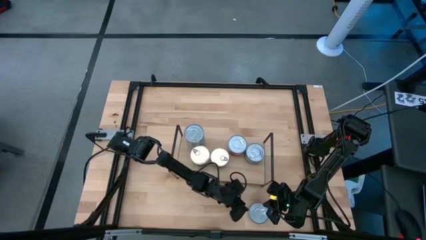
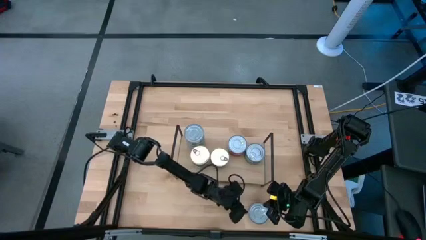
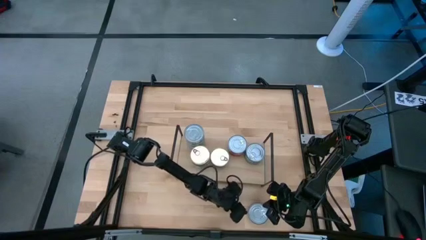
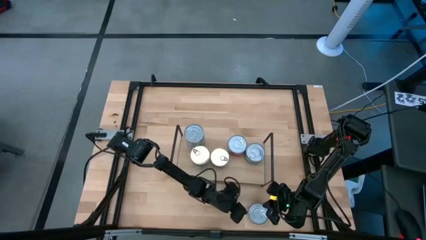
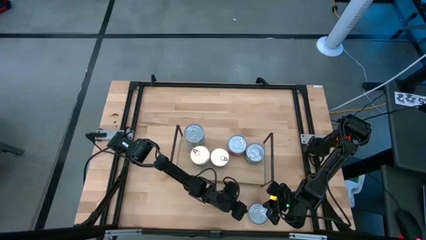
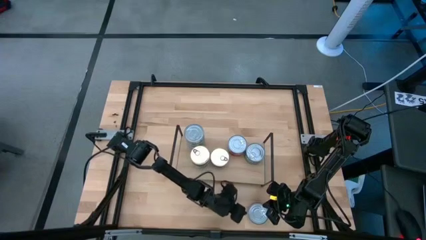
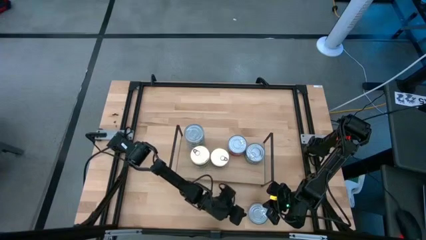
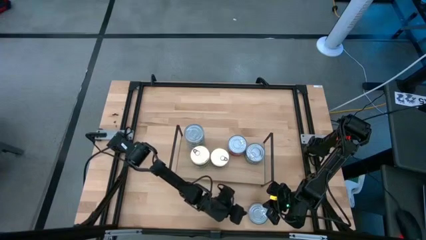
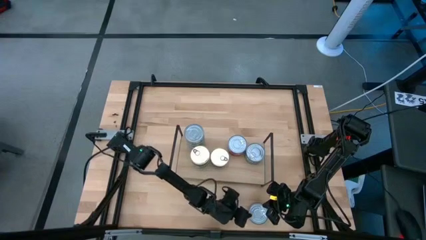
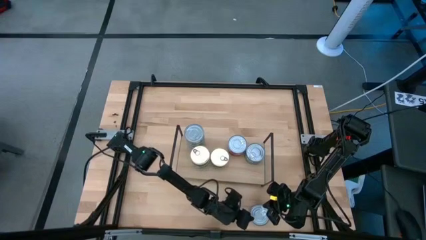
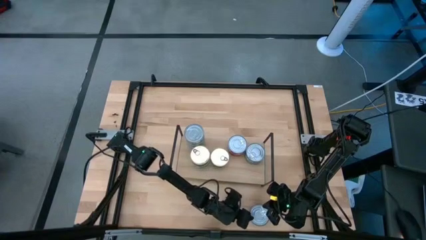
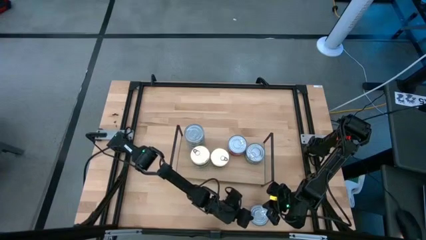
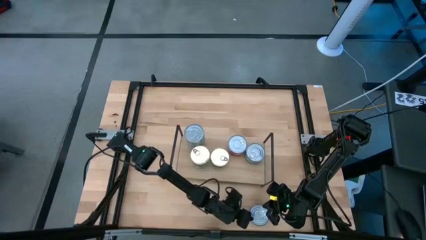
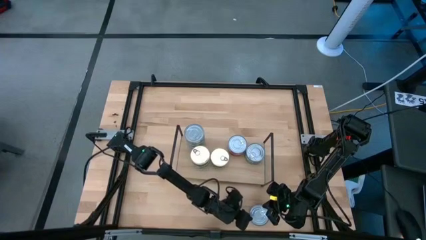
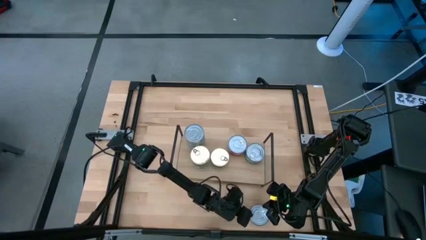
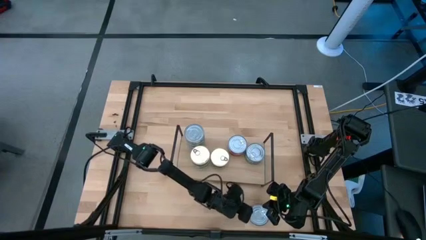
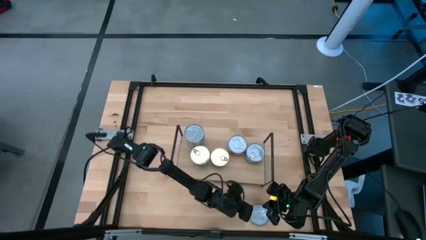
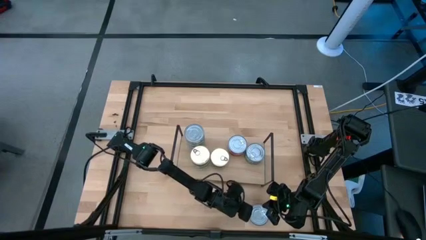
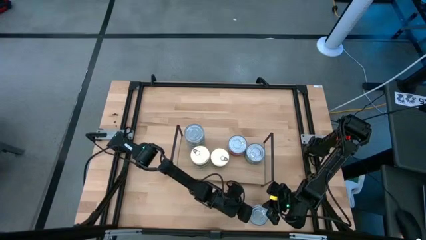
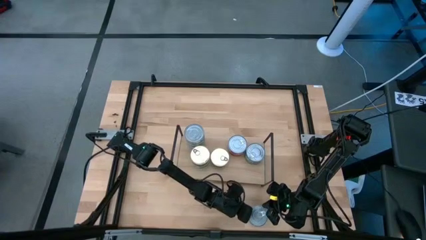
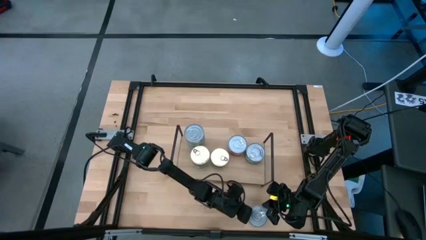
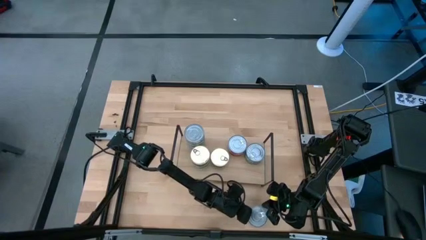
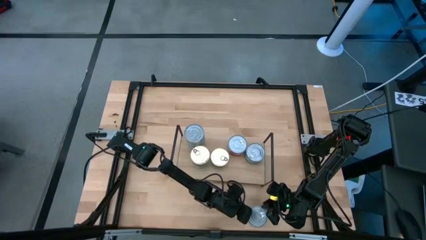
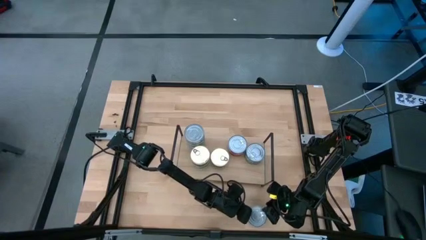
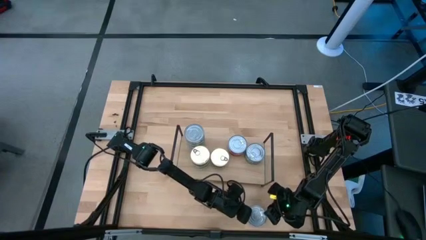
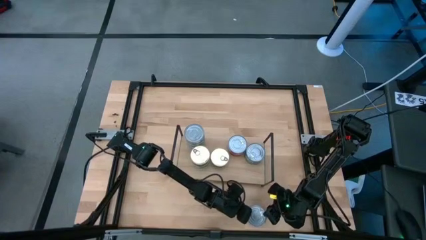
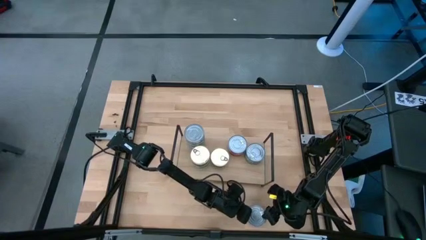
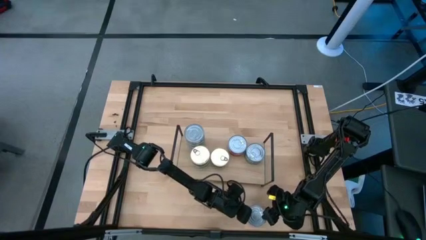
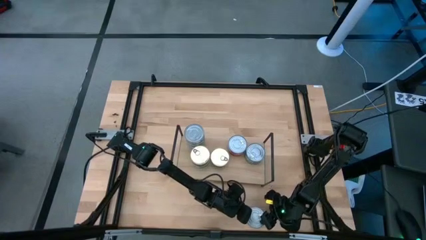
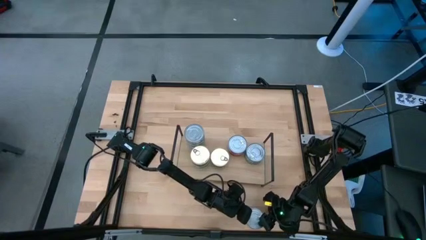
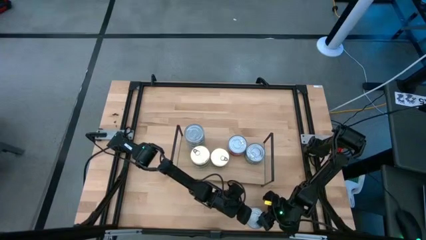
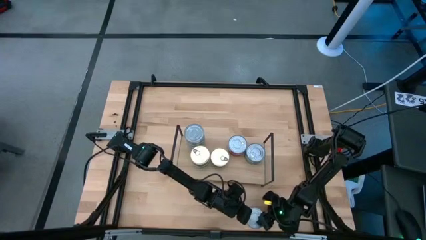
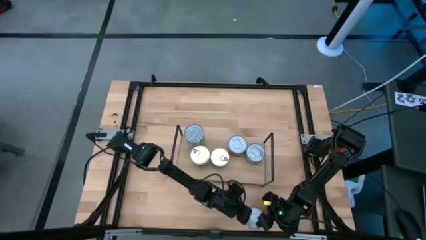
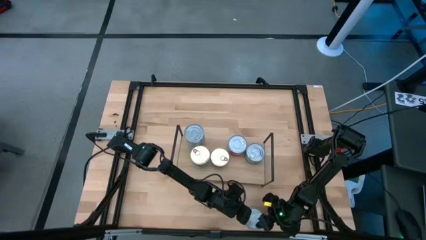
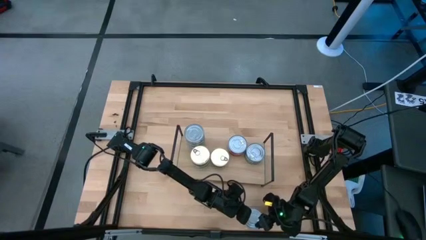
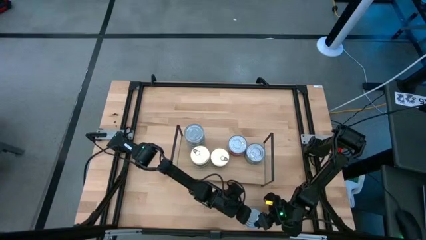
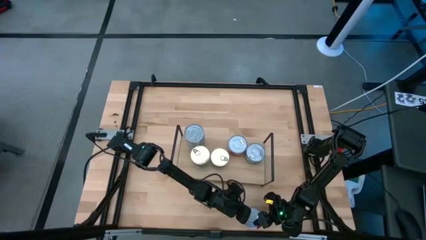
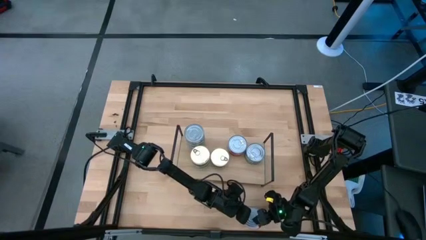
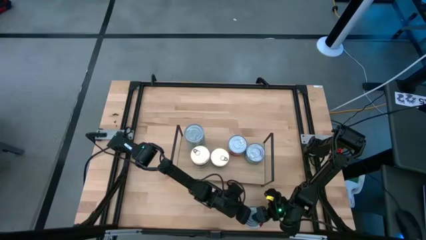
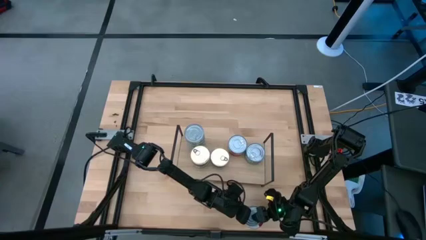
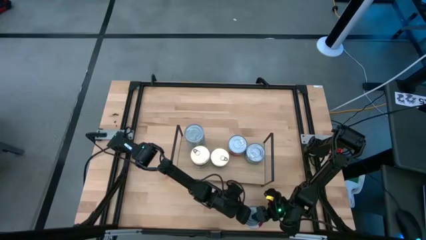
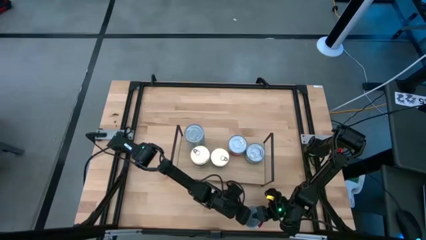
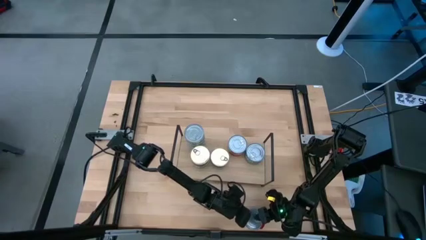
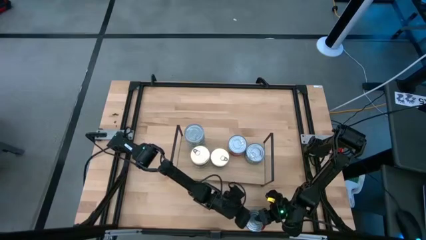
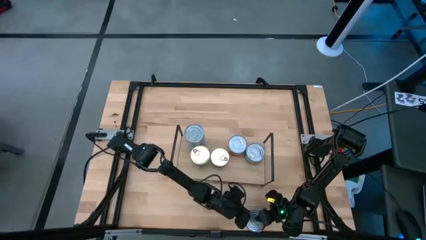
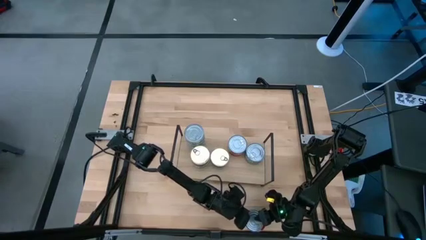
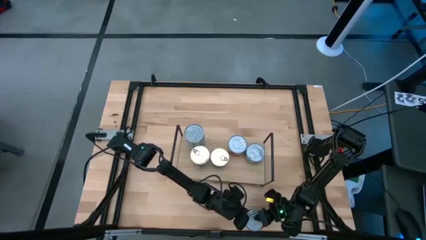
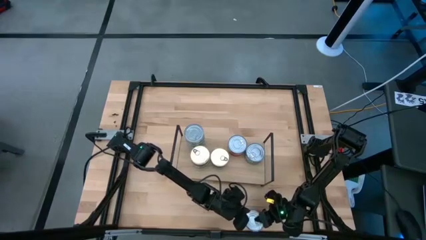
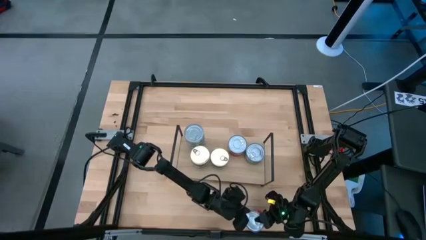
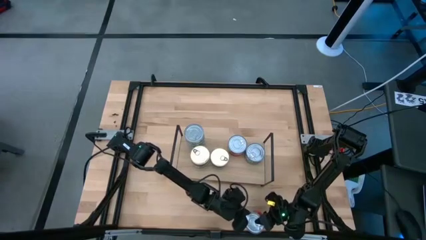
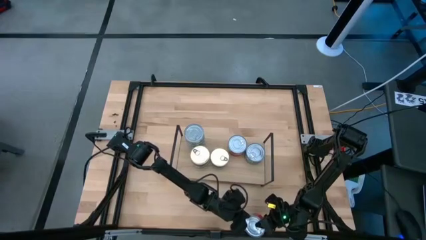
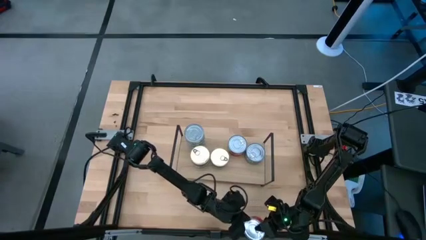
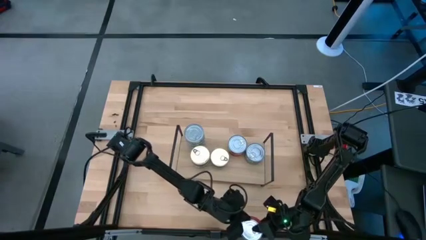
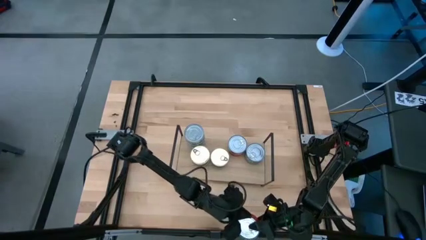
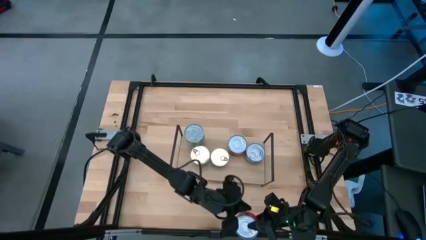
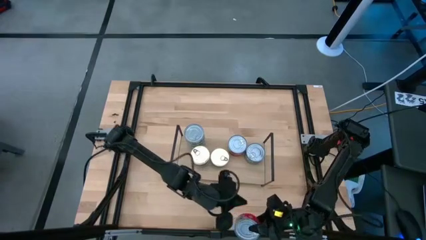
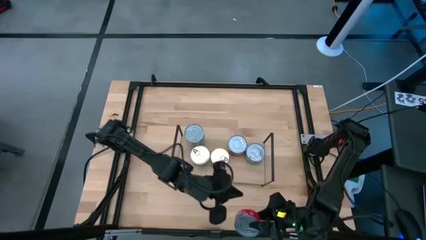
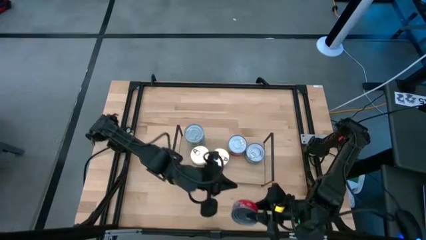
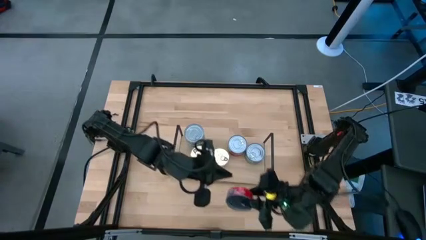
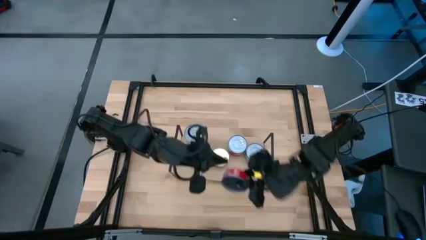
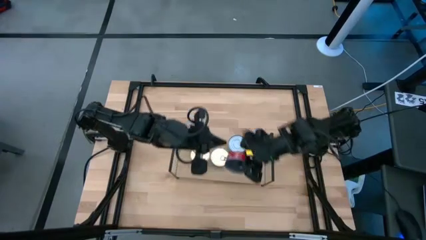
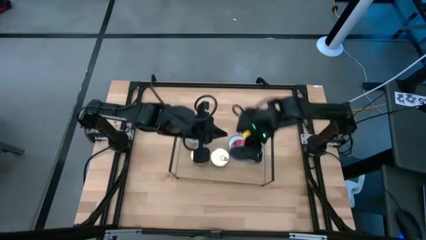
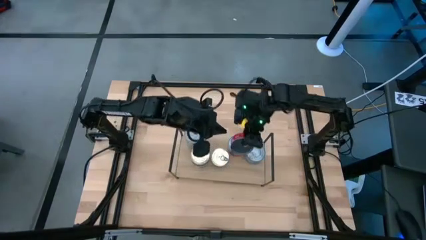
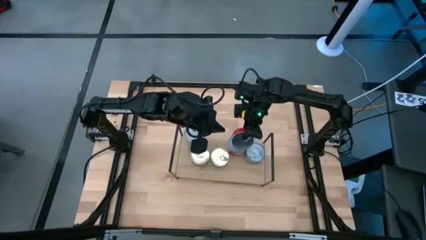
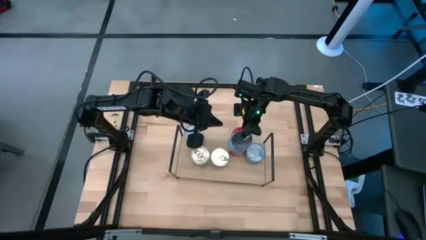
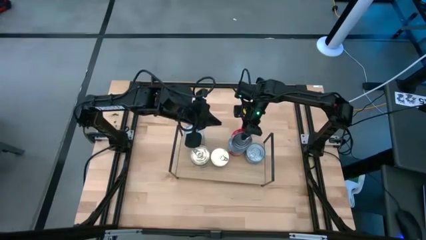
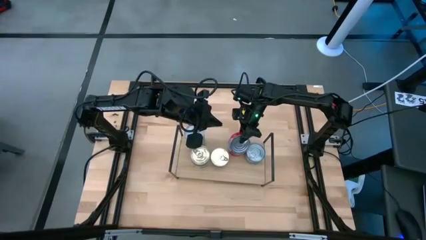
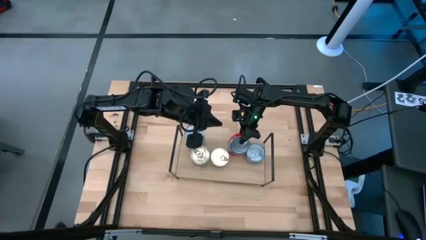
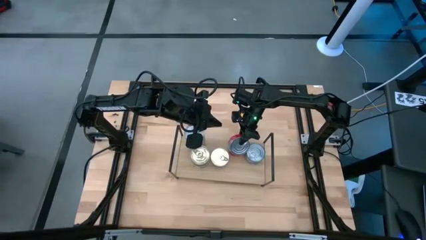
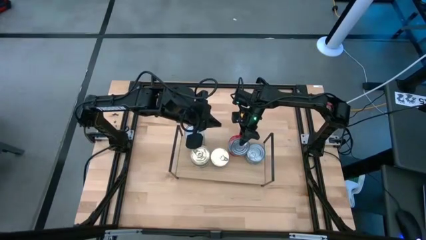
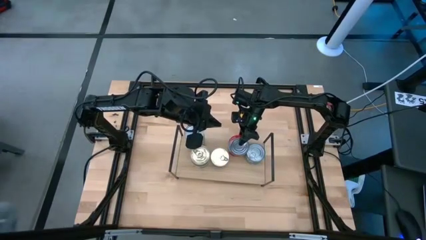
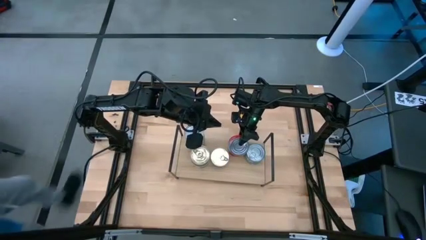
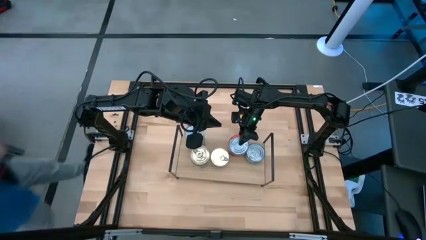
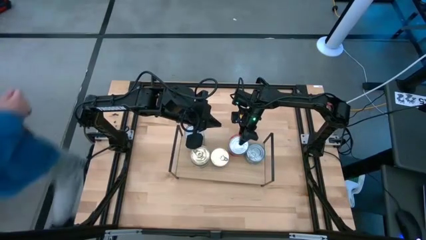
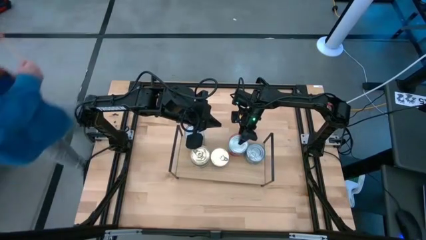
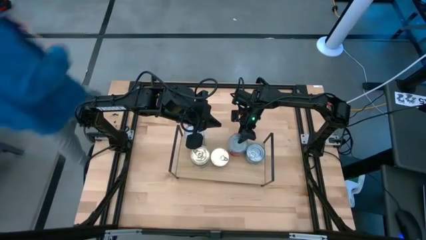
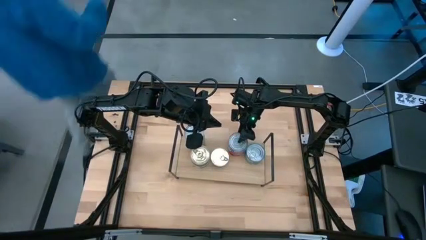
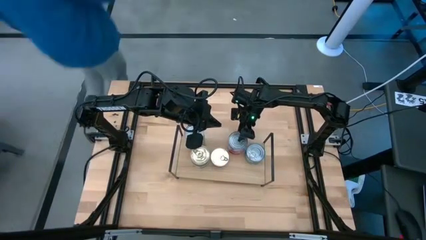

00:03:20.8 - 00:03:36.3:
Task: Stack canned seafood by type on shelf
Stack the red tuna can on top of the red tuna cans on the shelf

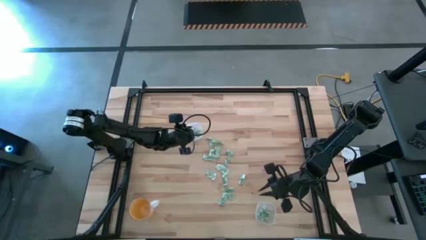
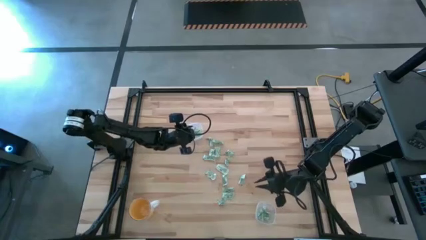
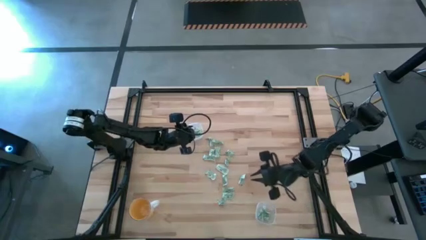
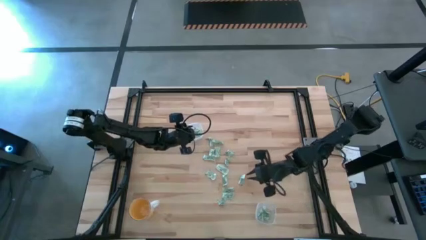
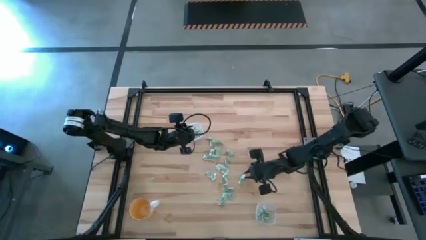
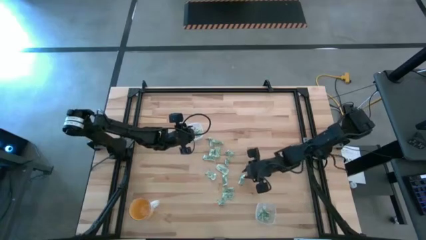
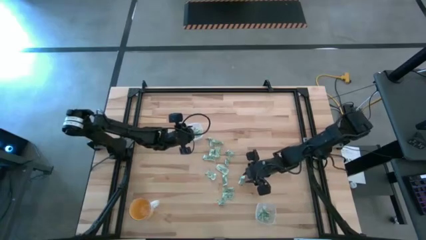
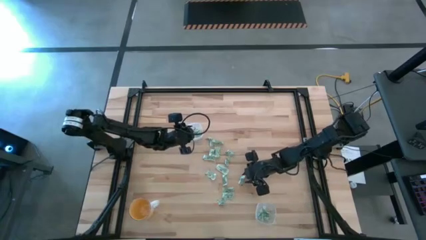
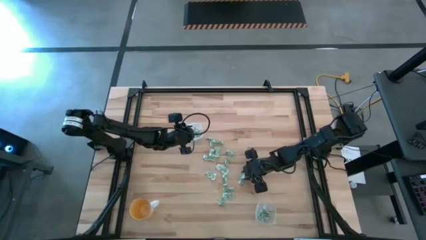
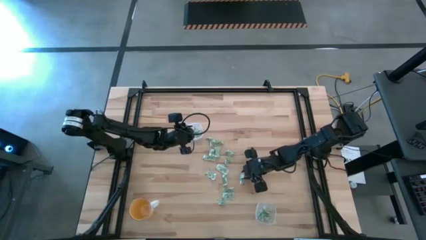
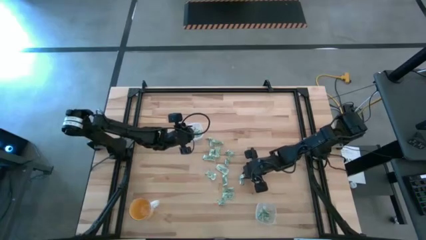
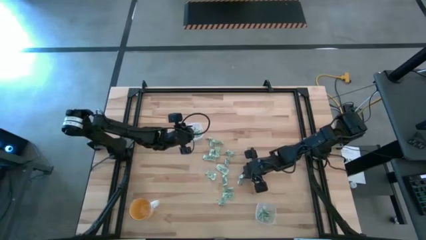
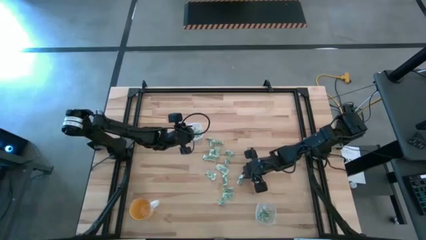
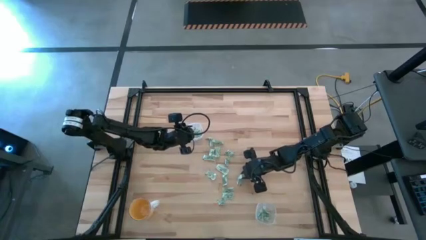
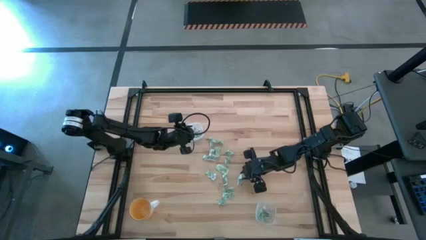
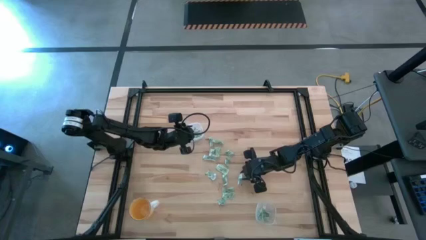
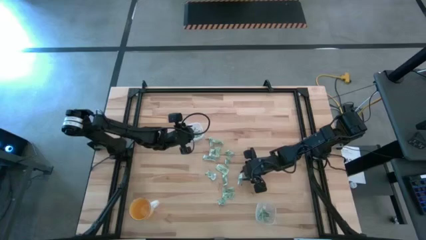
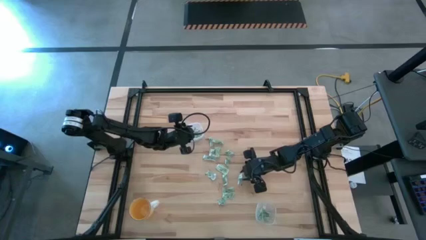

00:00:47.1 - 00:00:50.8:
Task: Pick and place Stevia / Truvia into bins
Put the stevia packet into the bottom transparent container
